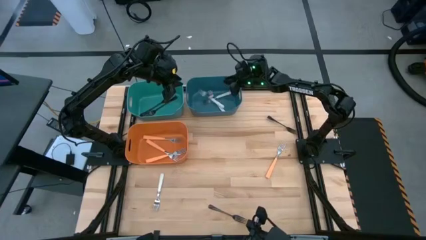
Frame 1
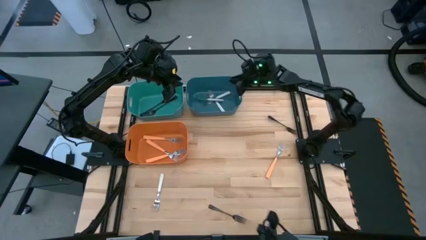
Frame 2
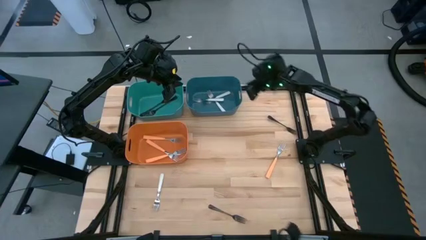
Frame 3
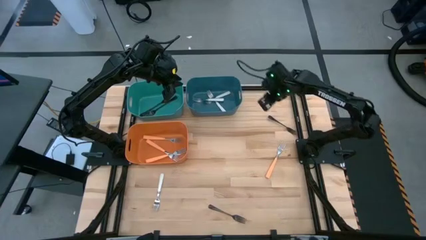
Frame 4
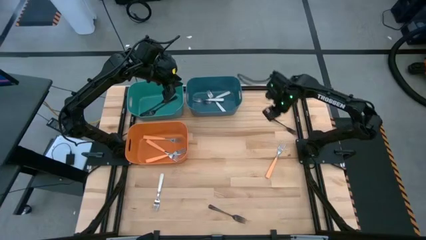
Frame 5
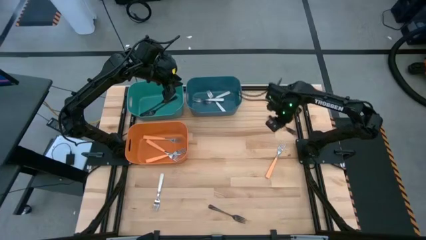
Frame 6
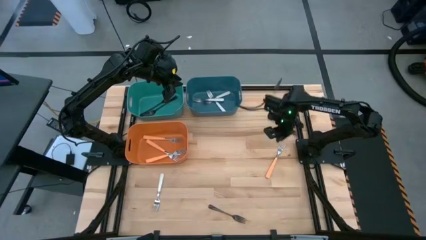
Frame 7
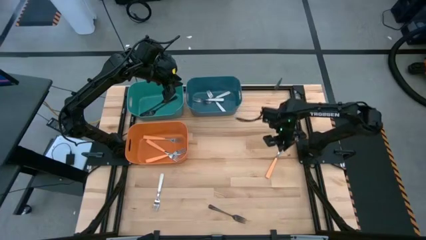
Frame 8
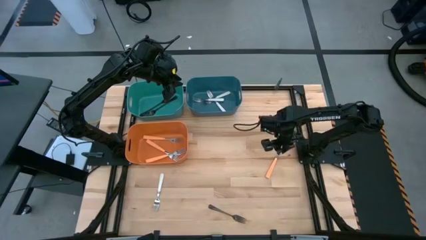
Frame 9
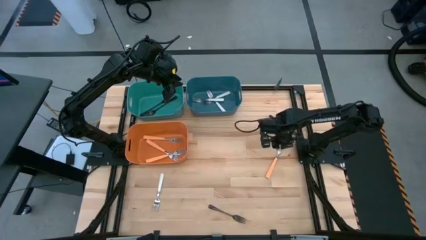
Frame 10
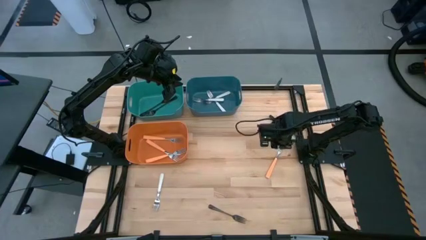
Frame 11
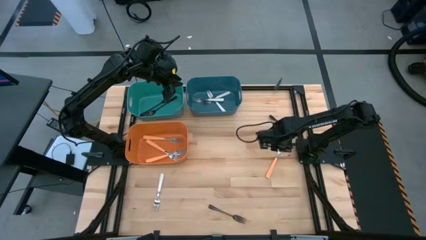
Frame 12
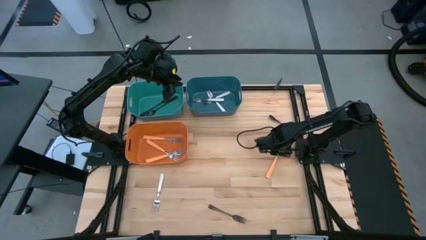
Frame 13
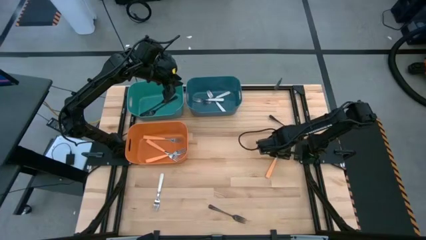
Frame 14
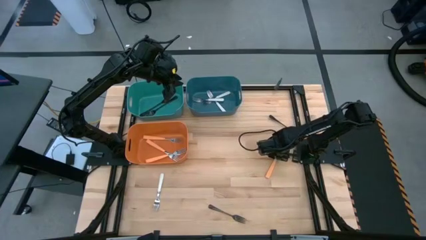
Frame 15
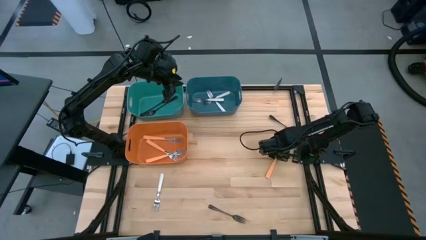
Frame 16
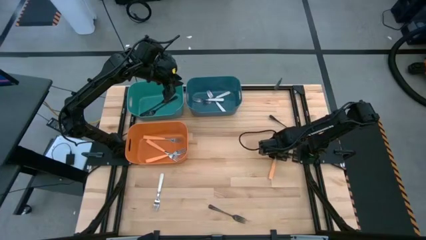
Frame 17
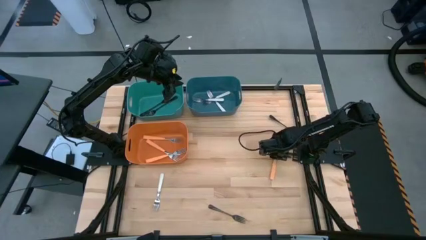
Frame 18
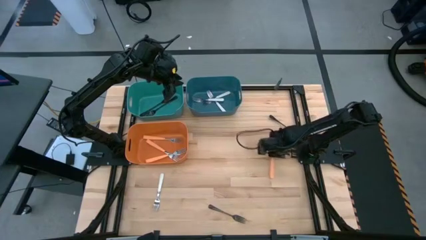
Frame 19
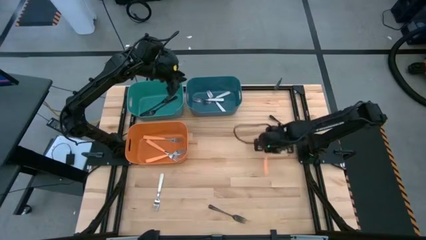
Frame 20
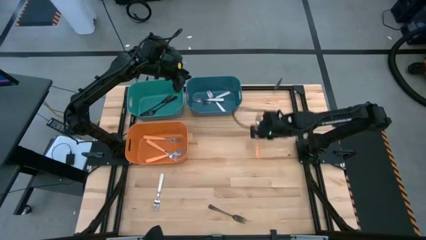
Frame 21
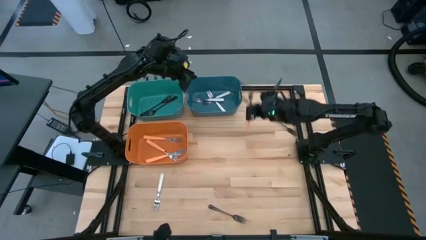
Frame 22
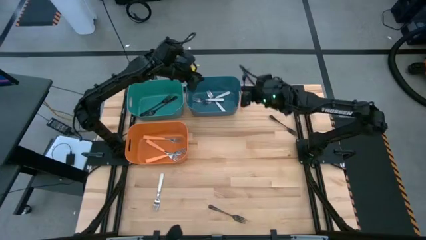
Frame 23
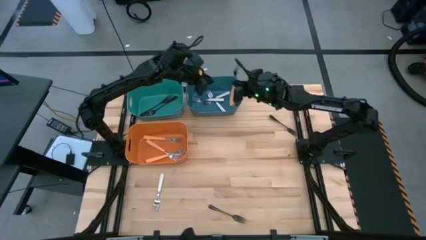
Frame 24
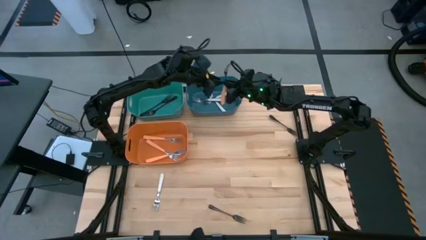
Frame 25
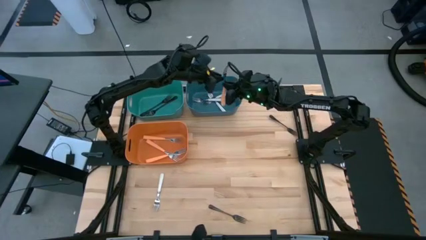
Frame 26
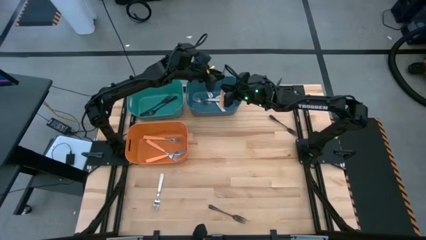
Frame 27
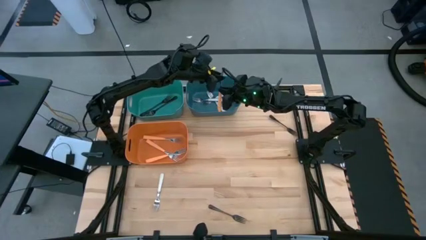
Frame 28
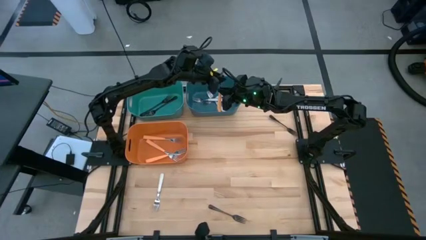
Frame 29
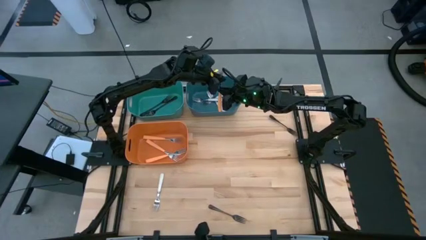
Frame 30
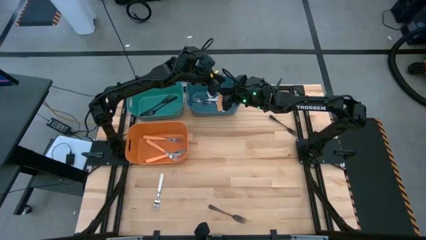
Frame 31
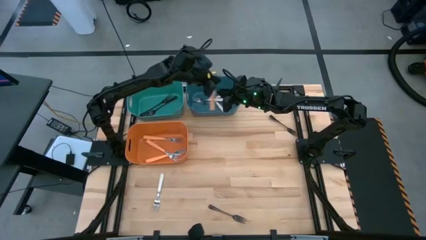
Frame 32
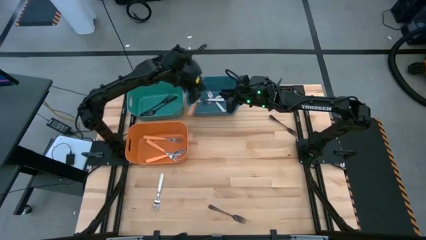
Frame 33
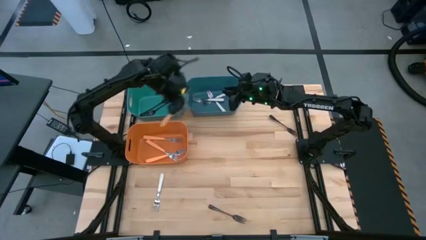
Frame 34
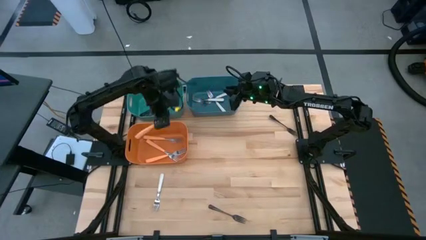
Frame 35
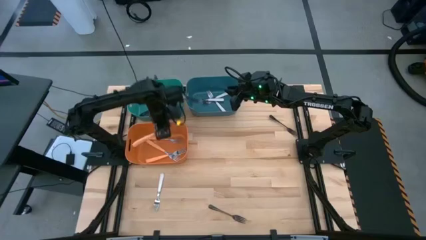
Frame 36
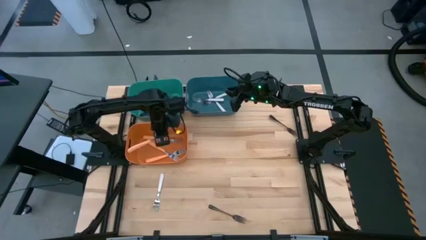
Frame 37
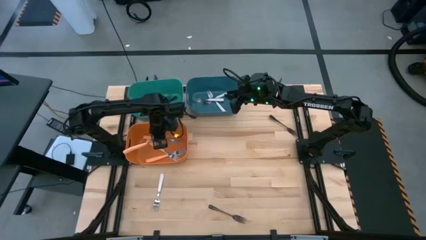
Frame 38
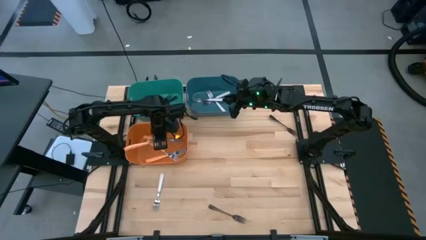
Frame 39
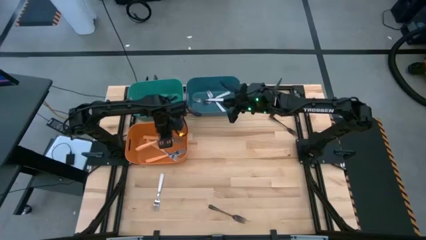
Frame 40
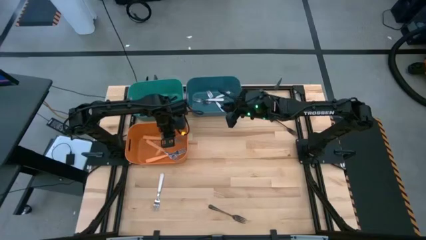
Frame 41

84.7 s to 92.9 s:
Task: Sort silverware by color (type)
Put the orange fork into the orange bin

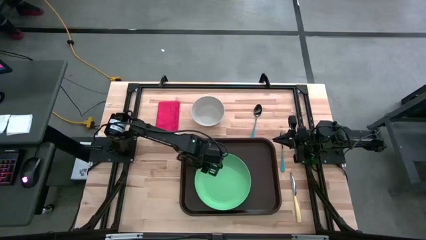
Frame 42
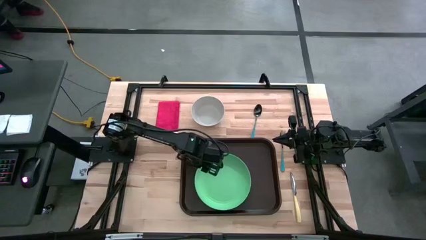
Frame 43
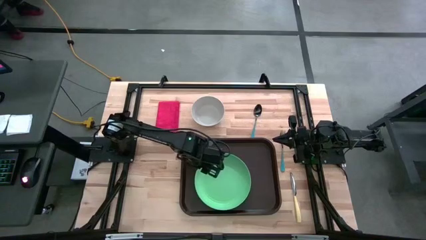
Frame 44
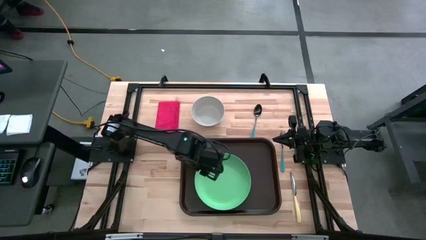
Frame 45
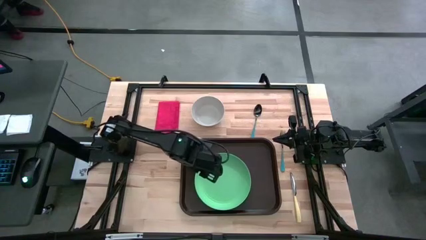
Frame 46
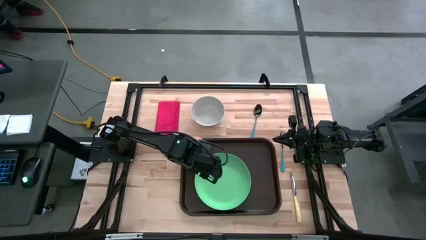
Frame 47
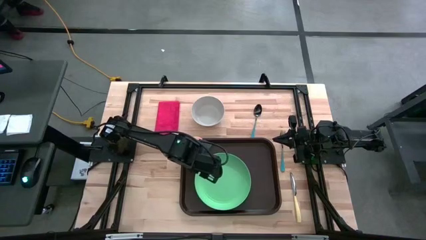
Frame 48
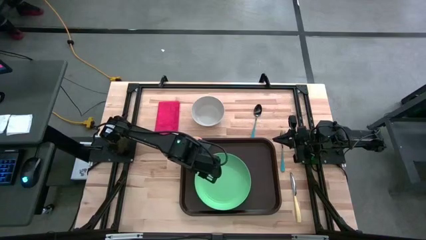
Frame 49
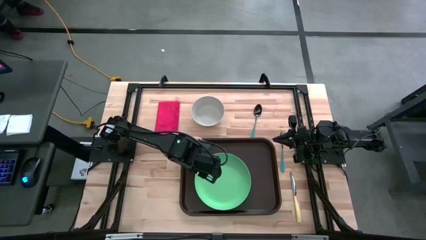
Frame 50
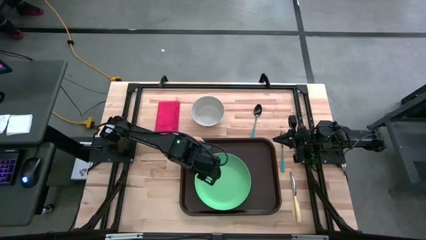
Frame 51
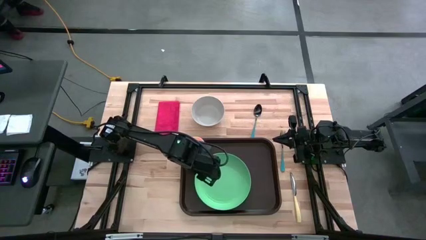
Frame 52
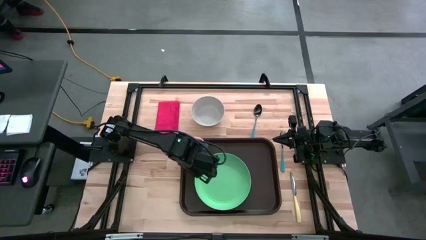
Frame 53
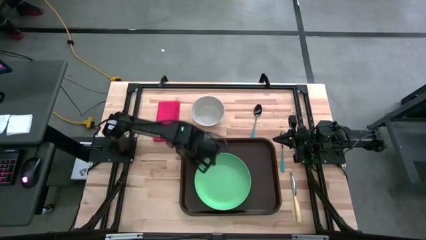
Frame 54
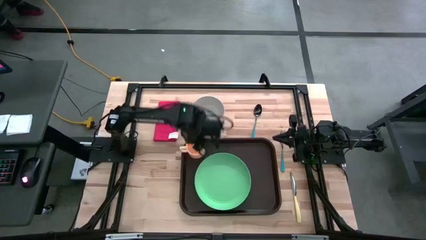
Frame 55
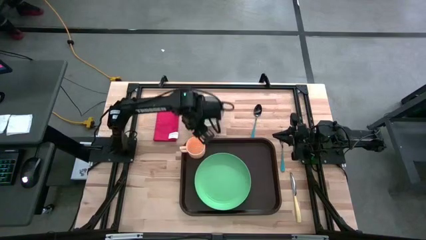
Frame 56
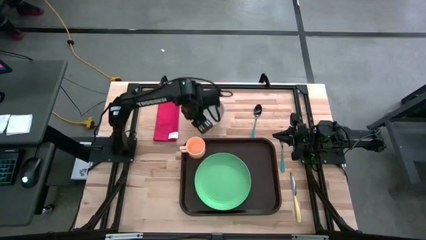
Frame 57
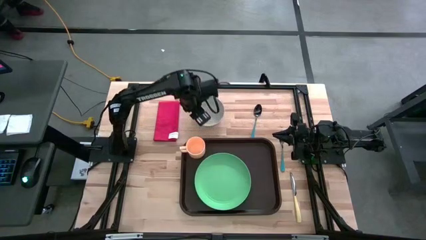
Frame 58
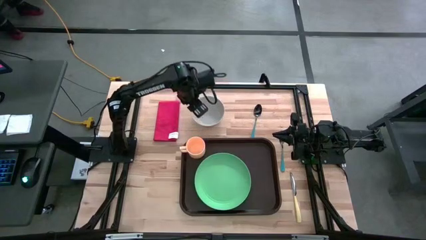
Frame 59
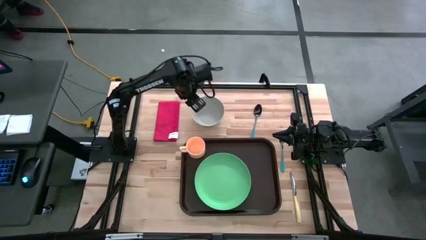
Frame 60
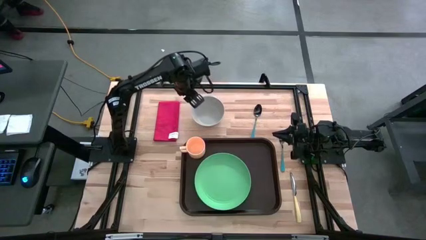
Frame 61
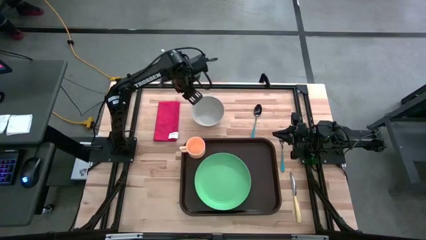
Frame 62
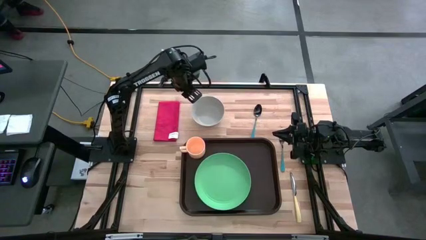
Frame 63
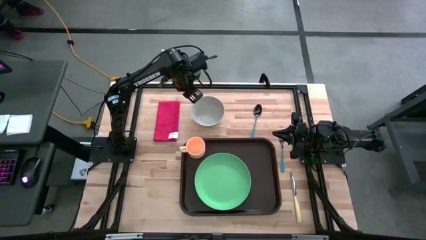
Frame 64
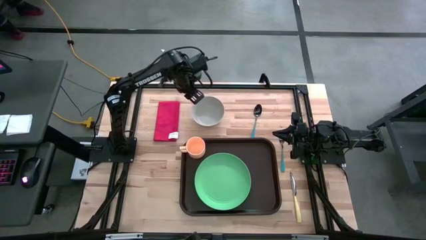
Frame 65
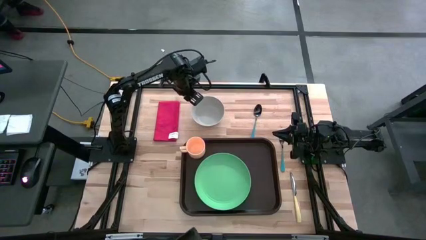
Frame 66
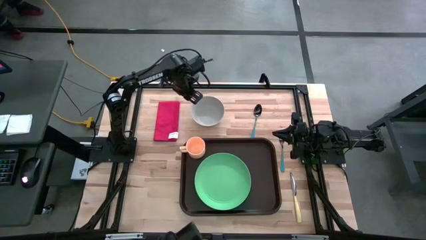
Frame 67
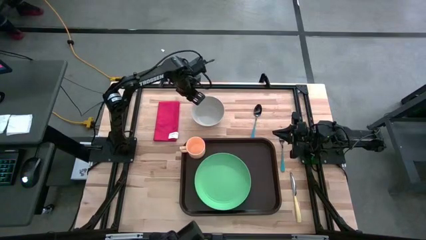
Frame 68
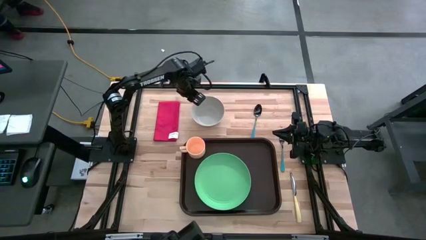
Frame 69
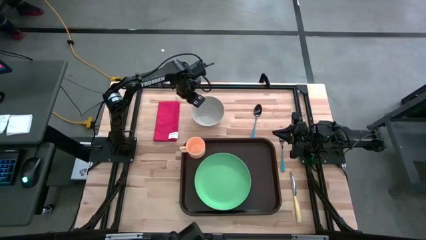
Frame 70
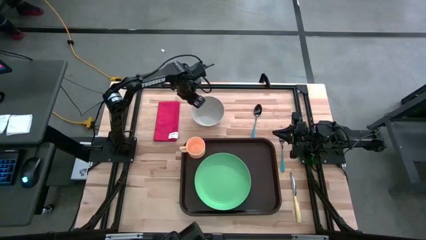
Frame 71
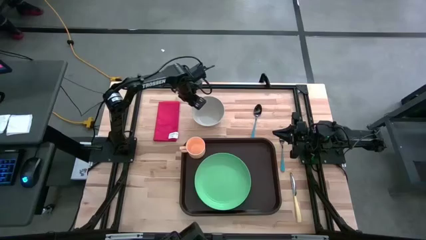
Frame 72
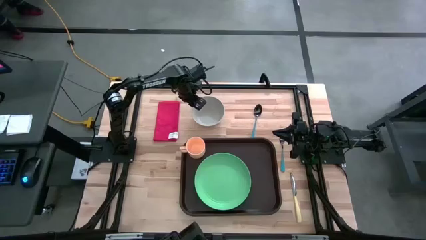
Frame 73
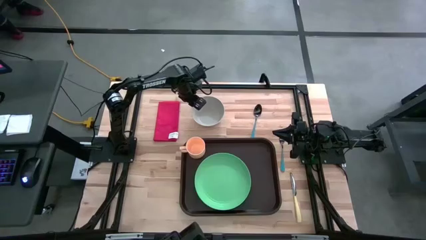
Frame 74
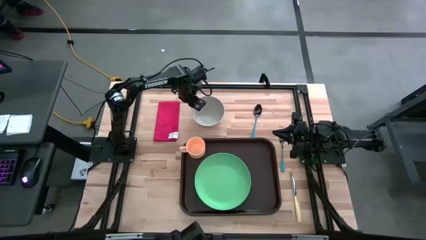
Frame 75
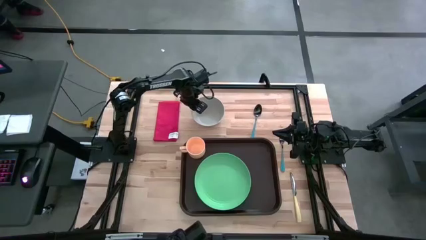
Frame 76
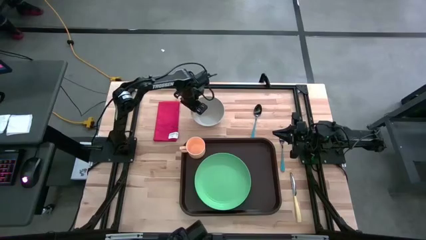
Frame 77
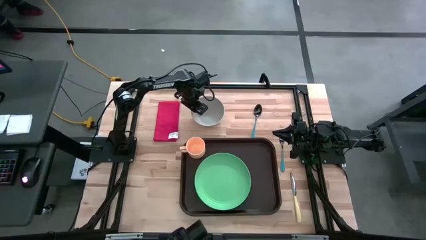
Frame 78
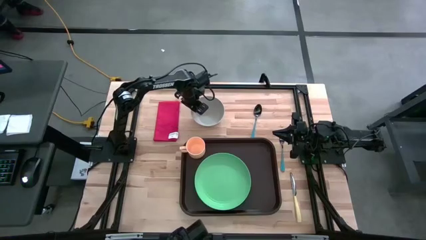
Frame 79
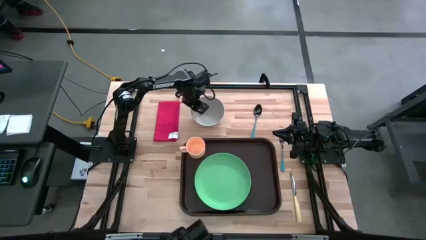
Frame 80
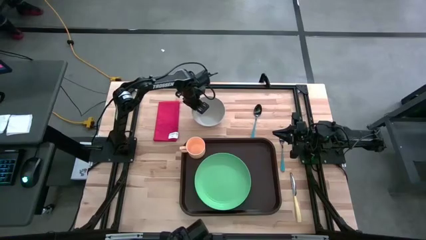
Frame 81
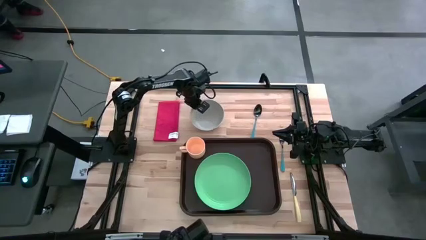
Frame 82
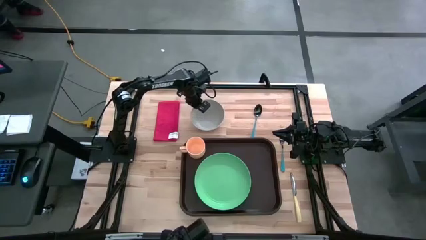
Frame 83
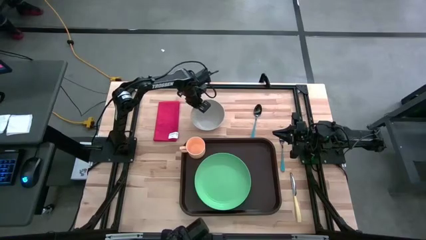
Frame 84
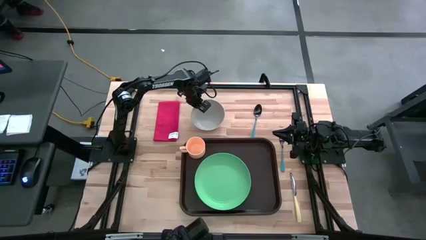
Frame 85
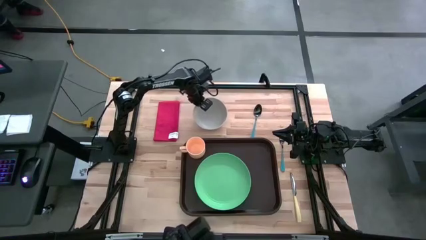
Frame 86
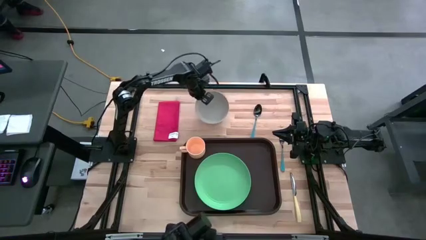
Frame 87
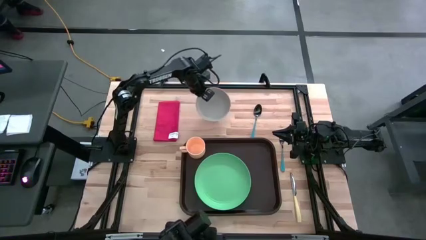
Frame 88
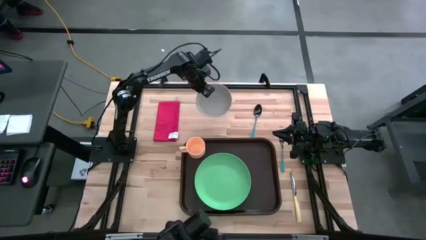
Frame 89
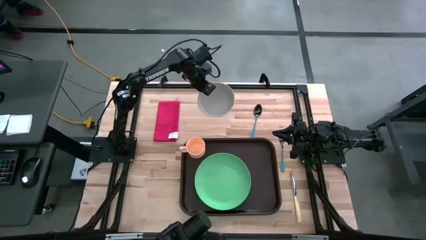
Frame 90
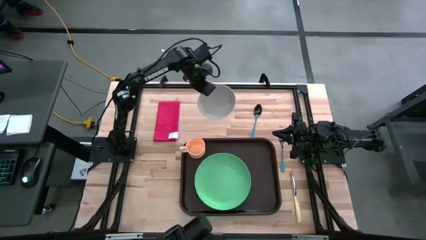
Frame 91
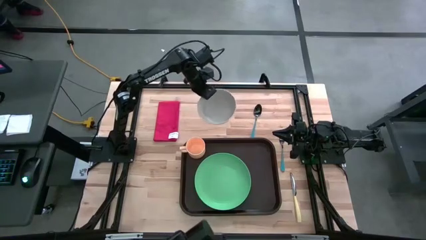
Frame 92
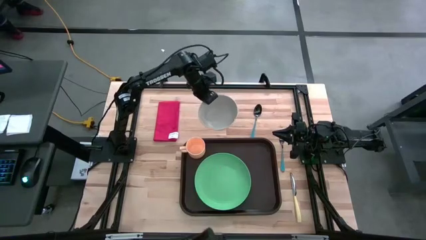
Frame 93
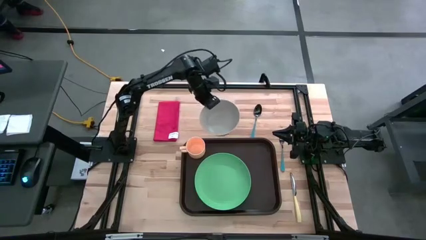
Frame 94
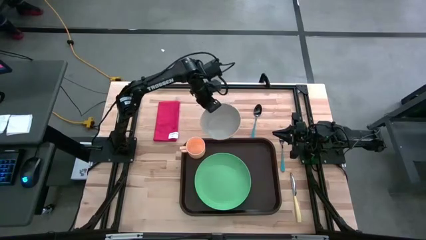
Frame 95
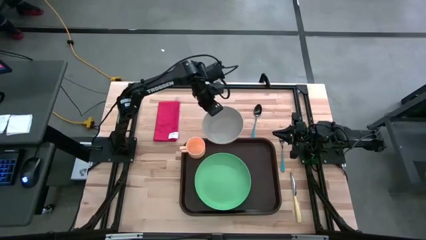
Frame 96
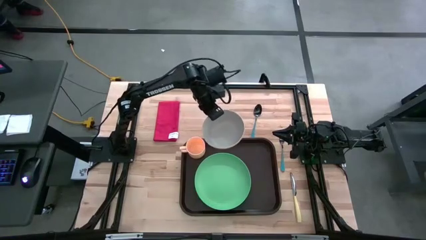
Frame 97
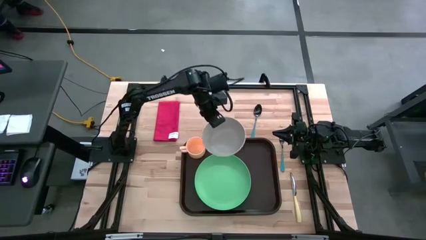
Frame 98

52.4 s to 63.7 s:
Task: Set up tray
Put the gray bowl on top of the green plate on the brown serving tray
